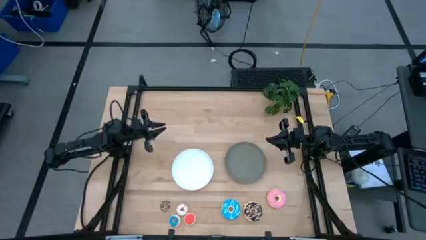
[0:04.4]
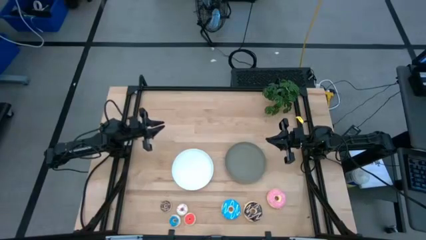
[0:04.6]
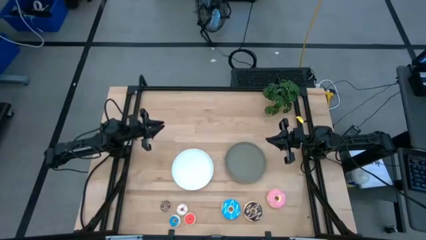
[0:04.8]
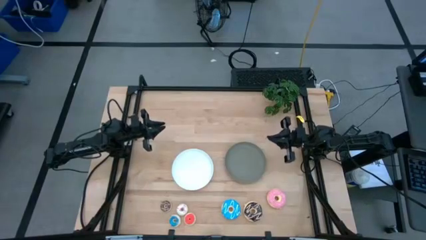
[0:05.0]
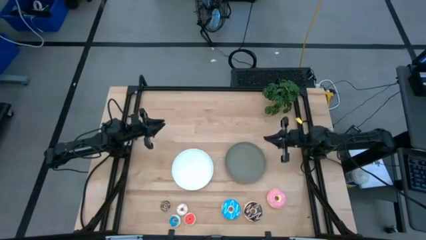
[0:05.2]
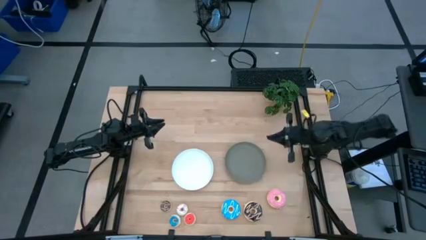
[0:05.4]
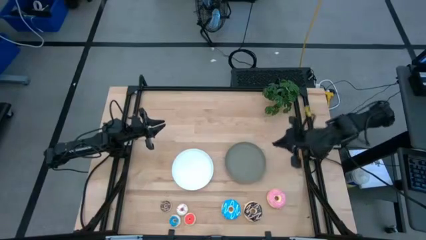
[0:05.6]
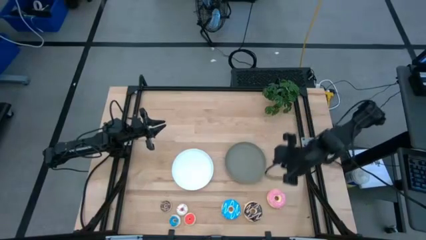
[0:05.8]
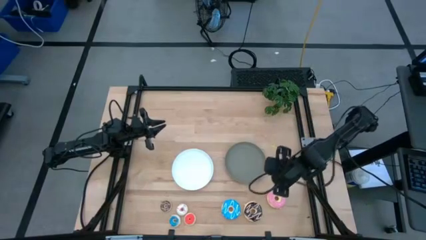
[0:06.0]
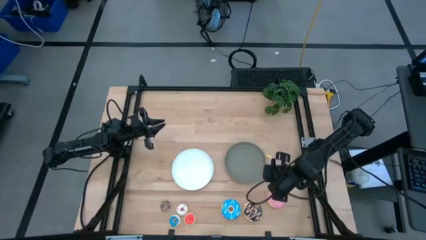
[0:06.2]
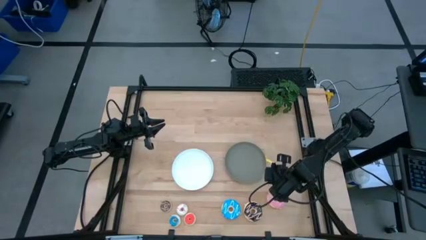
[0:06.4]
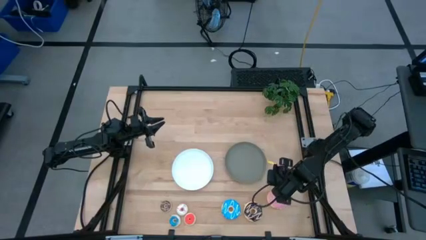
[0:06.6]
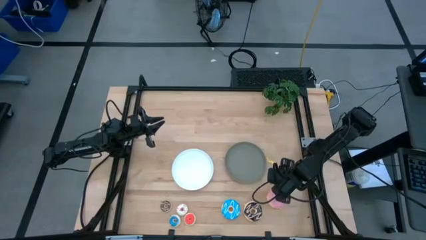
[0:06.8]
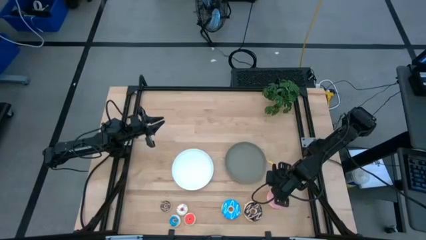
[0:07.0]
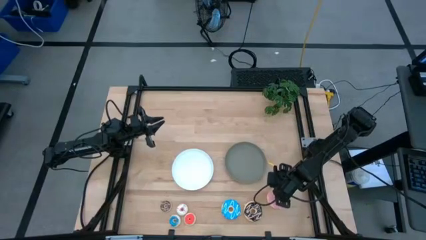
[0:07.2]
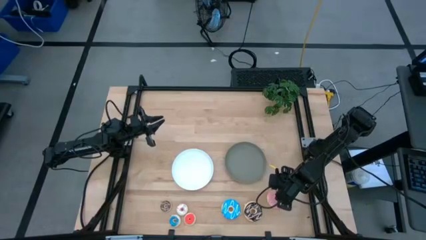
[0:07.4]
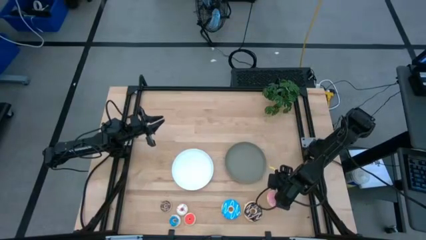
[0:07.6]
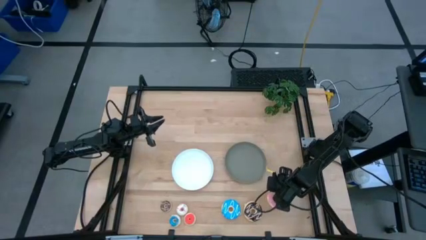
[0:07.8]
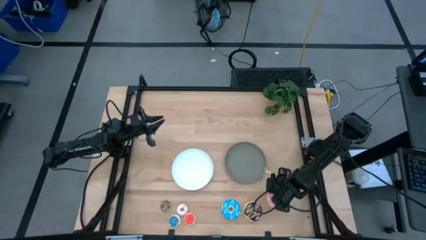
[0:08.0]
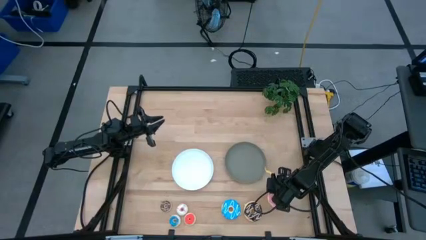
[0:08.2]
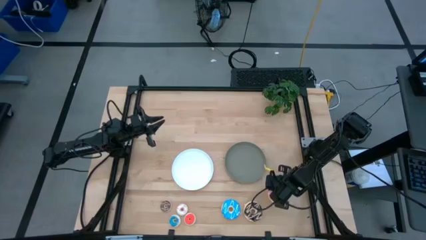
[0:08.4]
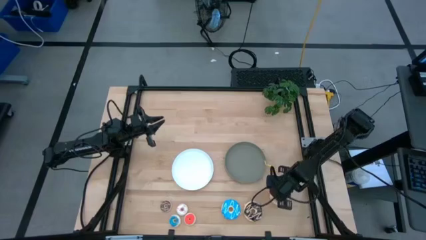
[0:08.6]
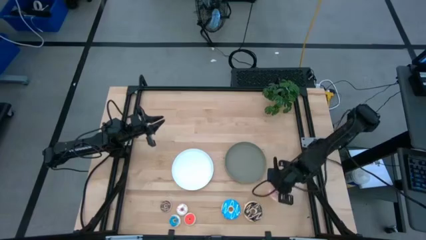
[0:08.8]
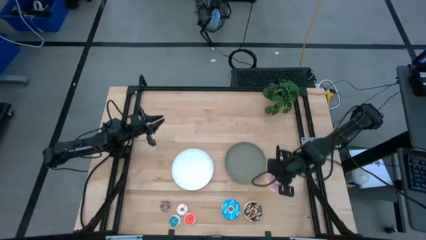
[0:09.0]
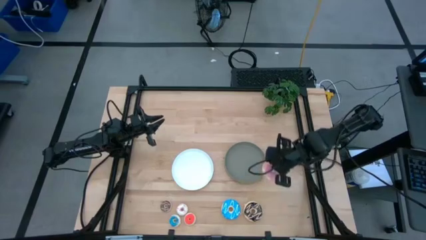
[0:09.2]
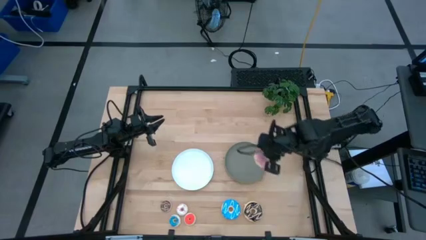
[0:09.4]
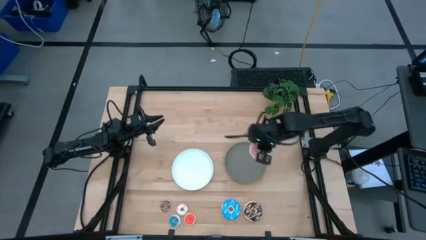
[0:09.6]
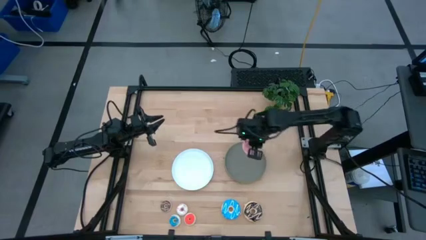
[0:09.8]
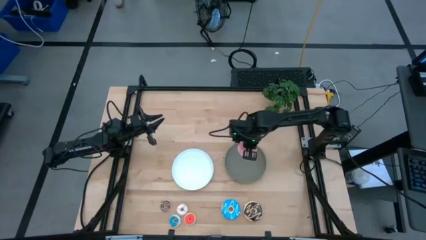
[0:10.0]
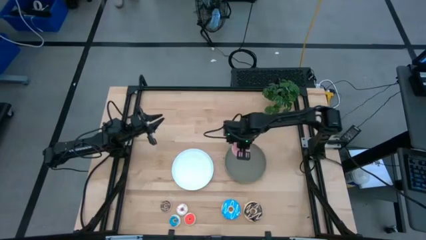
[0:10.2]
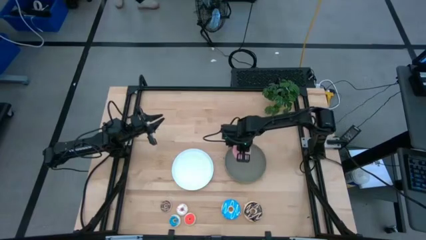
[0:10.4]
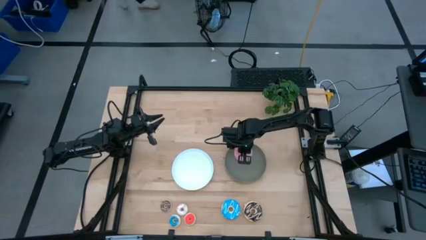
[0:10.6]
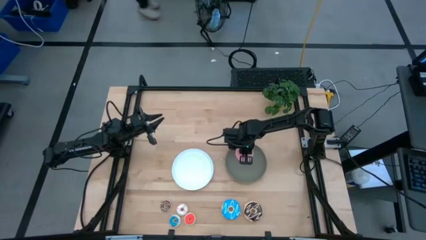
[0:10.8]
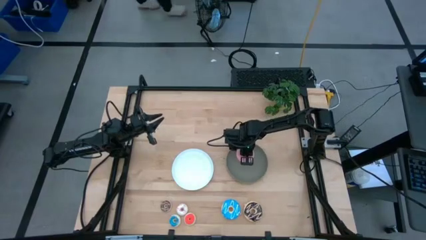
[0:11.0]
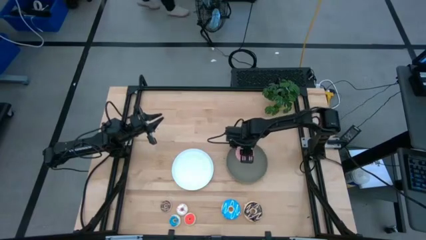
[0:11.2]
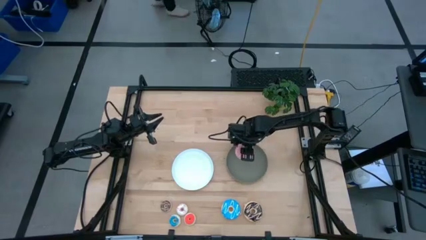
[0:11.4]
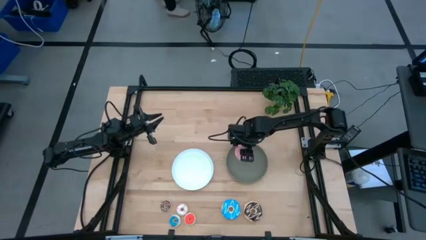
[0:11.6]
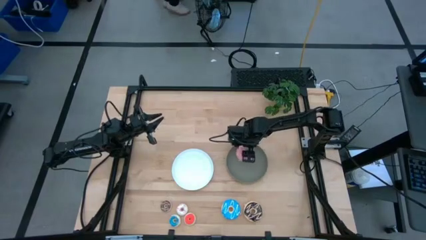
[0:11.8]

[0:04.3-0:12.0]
Task: Pick & Place donuts
Put the large pink donut on the gray plate

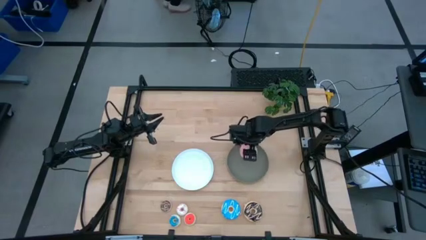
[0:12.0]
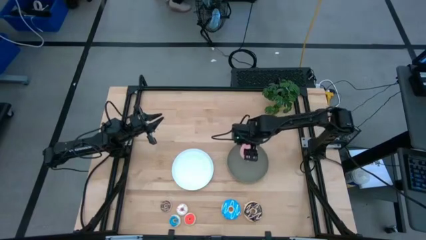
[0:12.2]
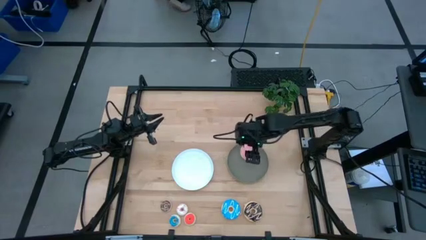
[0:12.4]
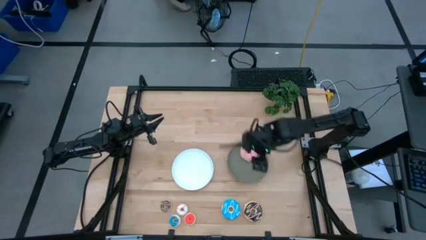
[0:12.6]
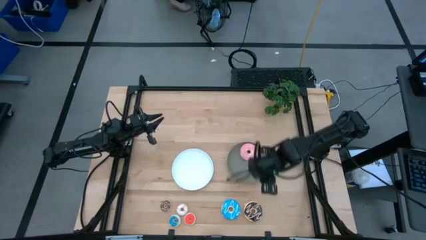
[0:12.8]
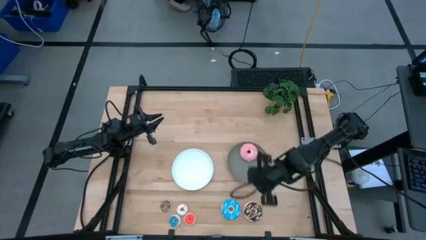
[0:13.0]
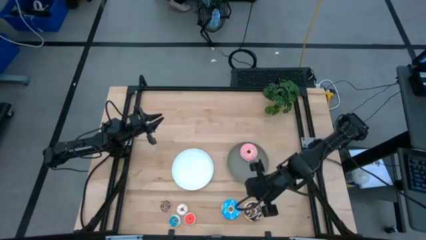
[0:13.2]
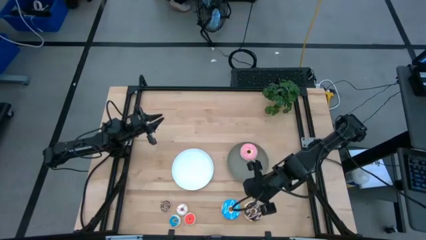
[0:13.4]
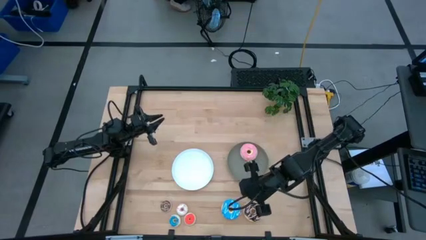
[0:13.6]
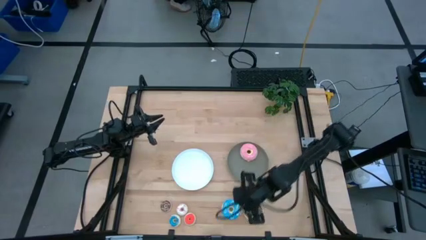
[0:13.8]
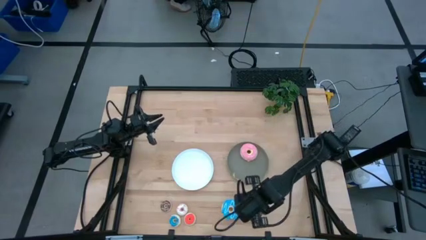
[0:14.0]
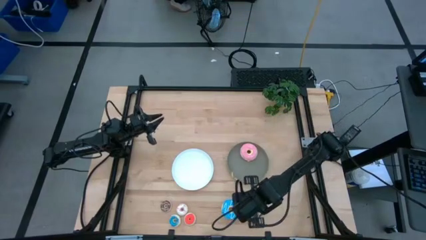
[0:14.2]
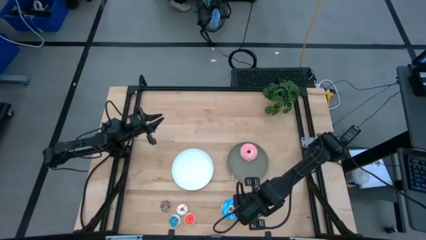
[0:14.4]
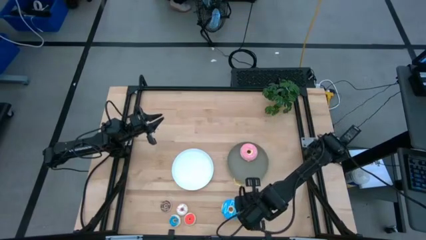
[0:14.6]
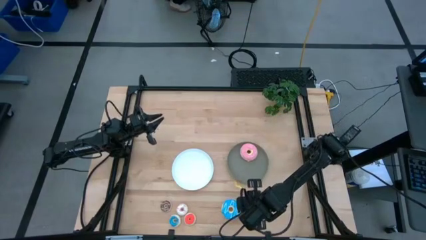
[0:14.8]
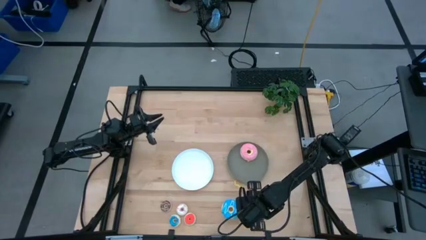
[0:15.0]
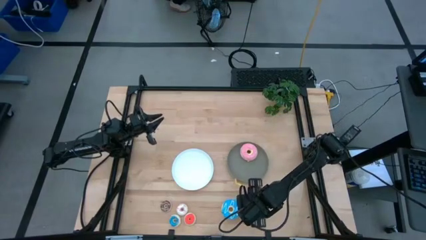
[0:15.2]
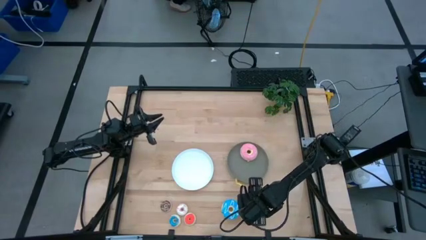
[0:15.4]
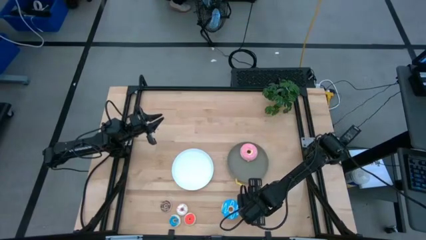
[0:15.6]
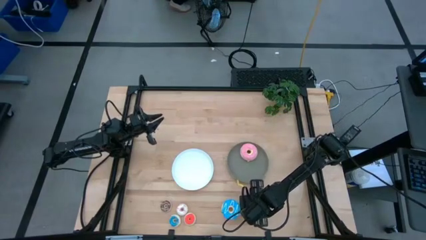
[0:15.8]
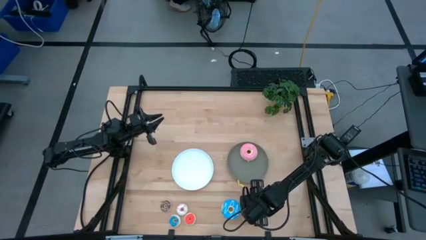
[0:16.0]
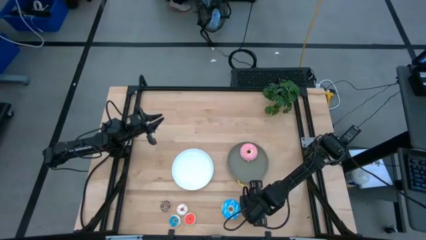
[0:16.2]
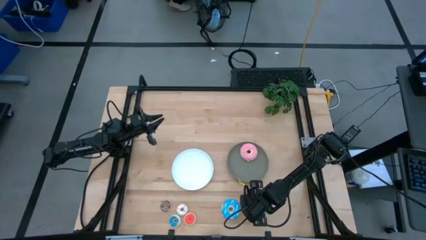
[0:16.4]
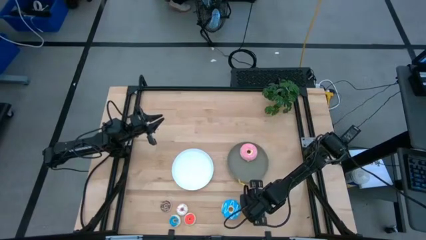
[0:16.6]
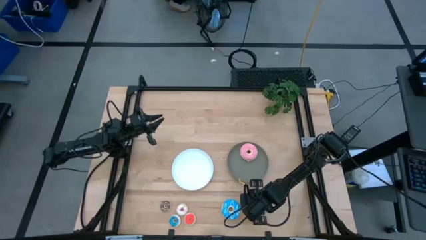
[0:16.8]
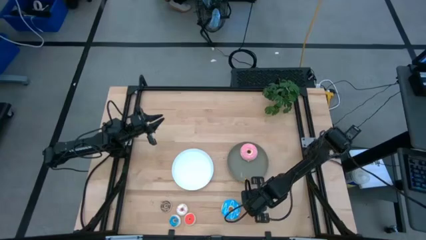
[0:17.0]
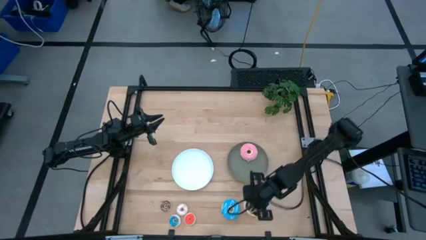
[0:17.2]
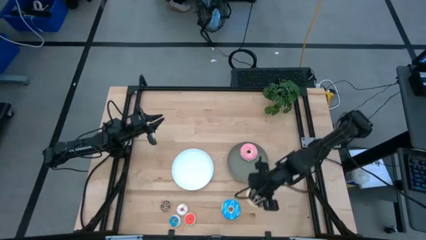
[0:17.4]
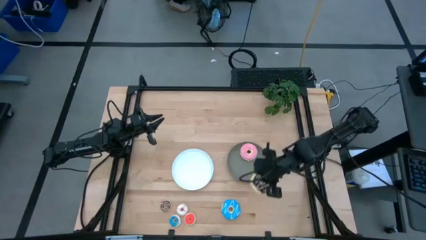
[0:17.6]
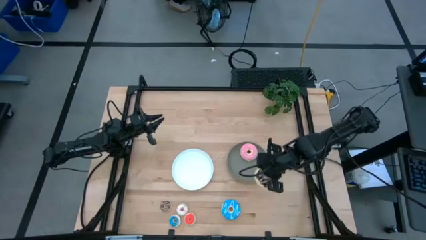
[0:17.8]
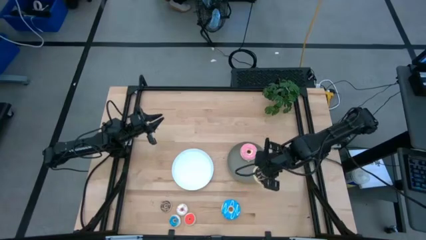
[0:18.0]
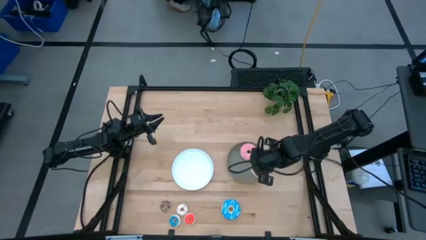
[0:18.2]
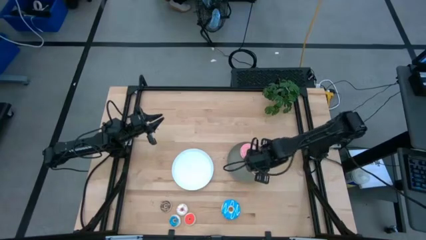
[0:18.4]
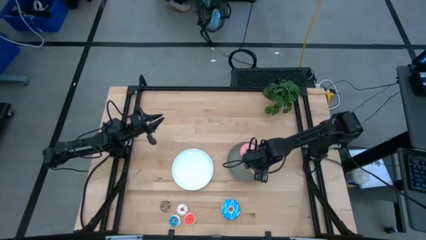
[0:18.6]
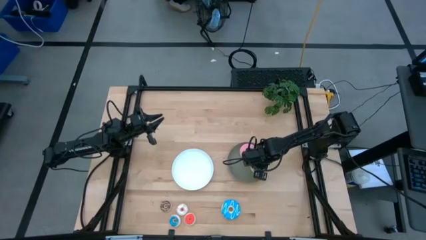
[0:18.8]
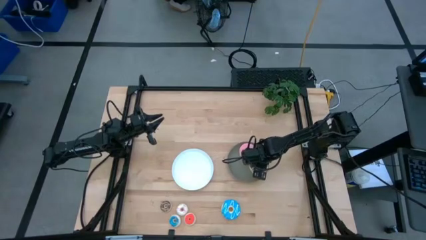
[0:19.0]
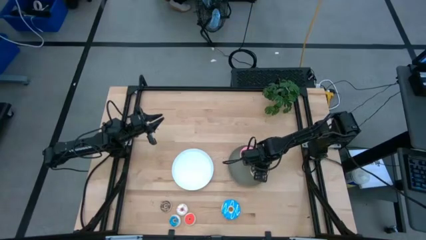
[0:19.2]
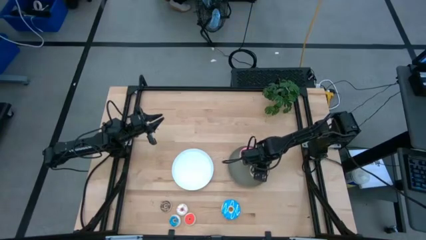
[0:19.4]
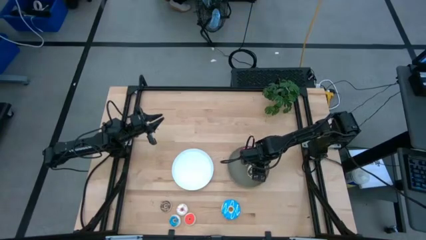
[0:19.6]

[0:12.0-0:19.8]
Put the large black donut on the gray plate

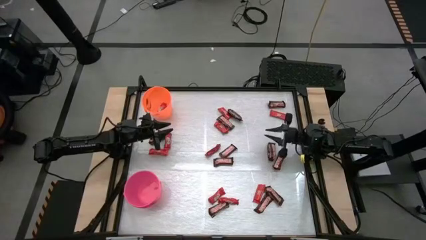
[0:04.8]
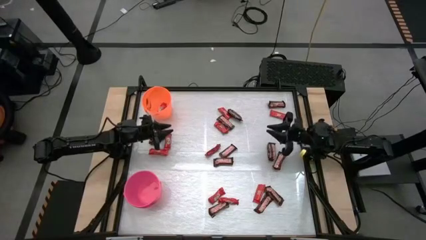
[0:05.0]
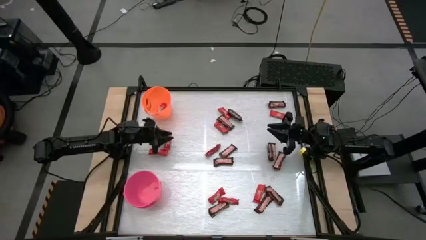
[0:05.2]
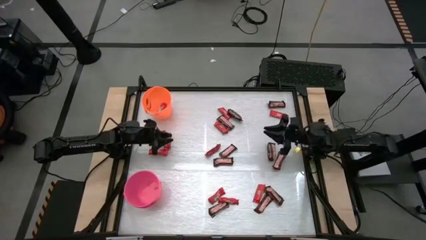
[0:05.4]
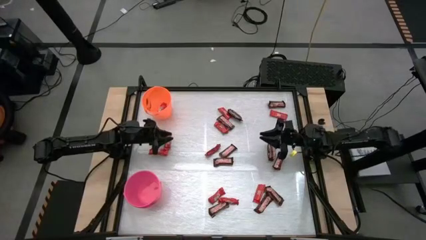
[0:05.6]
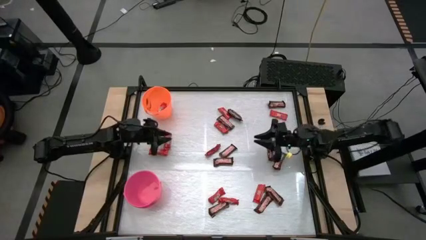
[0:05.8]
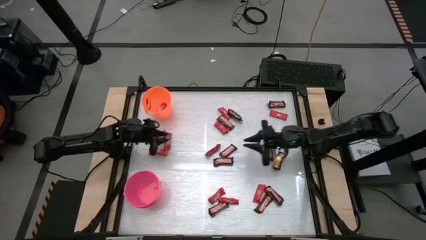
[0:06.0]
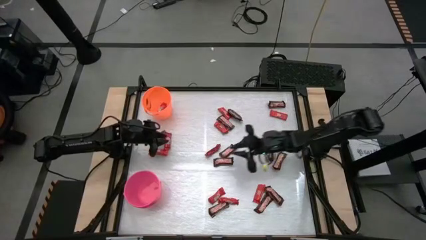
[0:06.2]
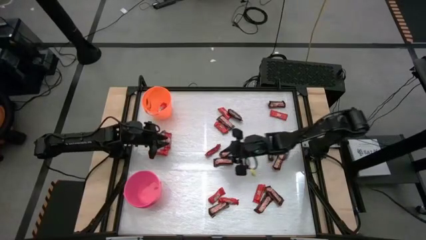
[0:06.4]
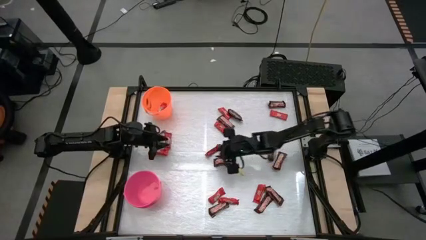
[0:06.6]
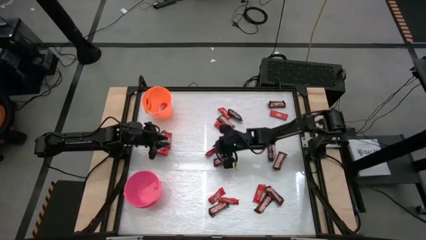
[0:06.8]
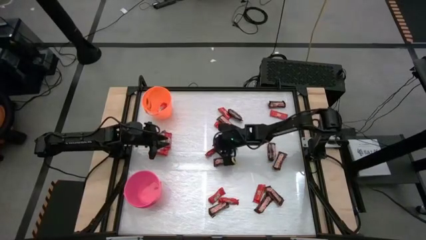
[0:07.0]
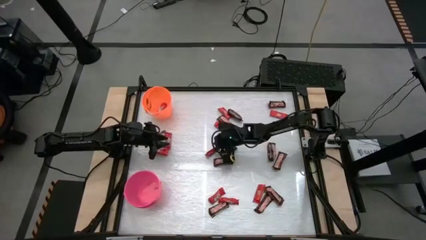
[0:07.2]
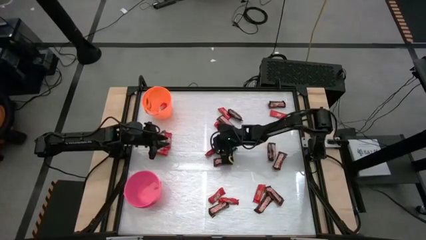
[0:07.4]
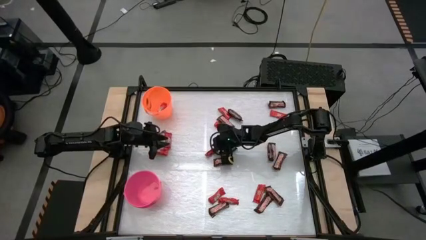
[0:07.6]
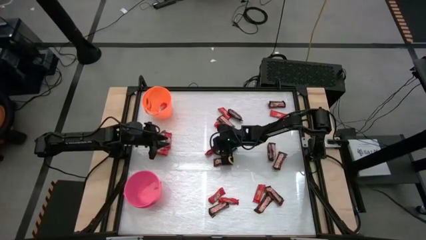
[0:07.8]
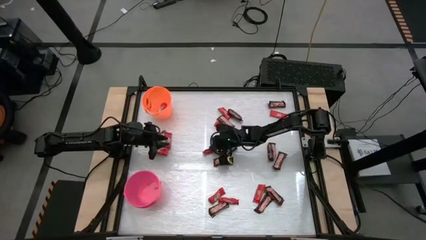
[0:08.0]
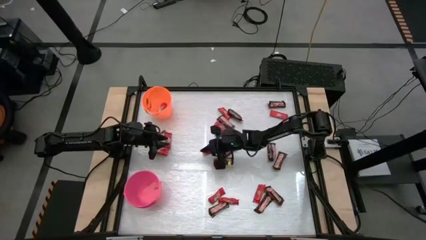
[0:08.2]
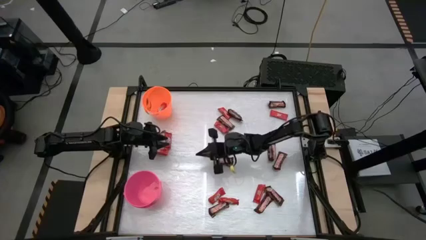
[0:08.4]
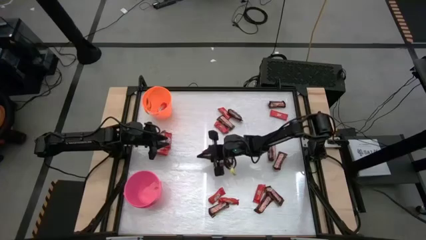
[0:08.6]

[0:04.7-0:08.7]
Task: Sort candy by brand, put in halloween buckets
Put the red chocolate bar into the pink bucket
